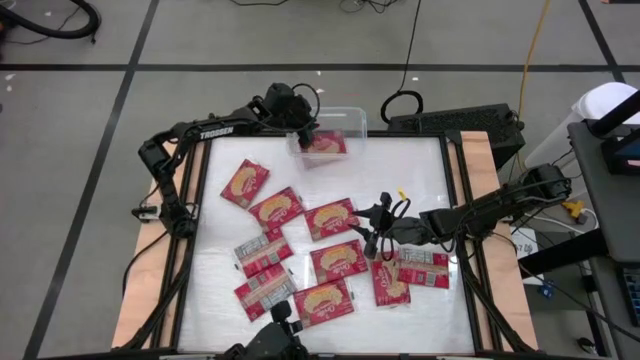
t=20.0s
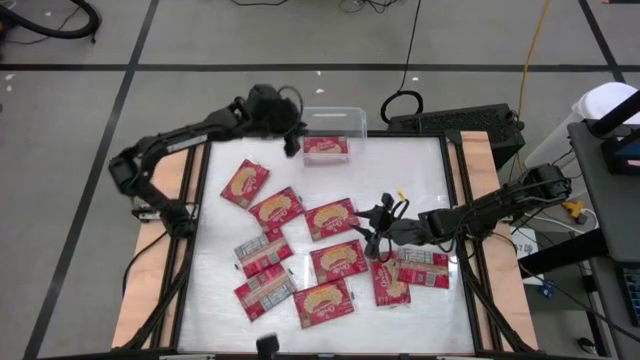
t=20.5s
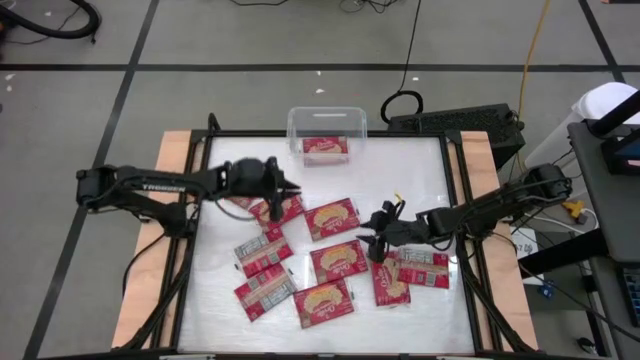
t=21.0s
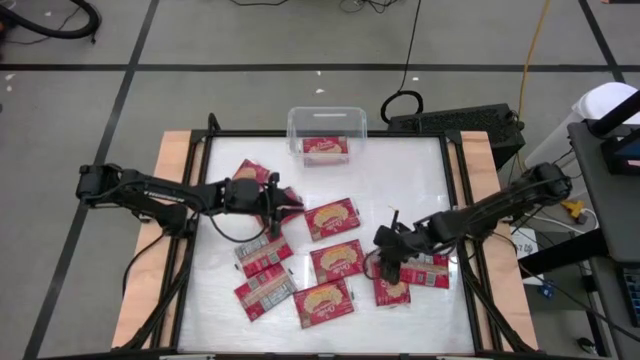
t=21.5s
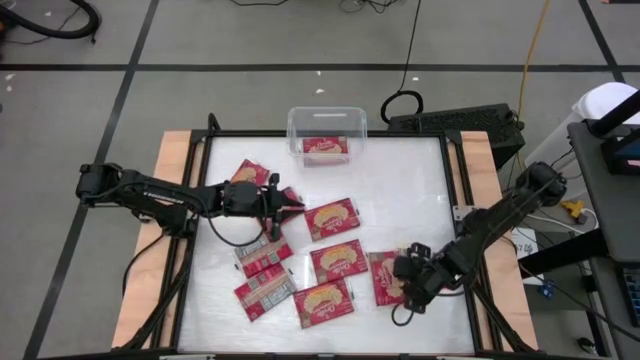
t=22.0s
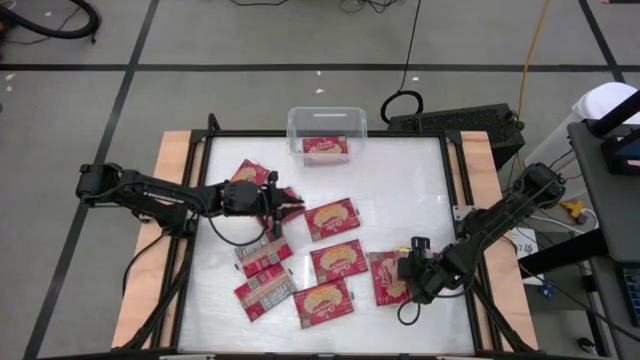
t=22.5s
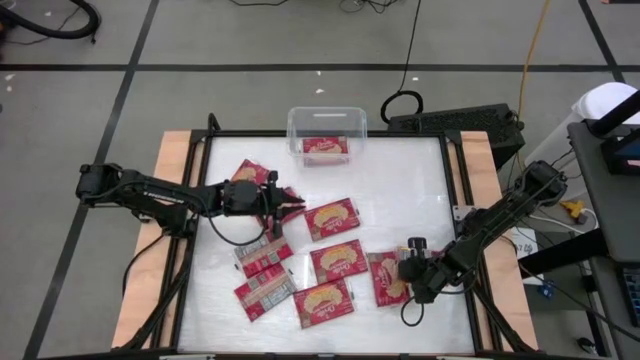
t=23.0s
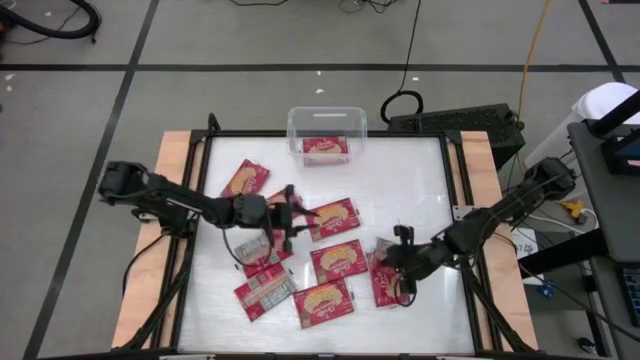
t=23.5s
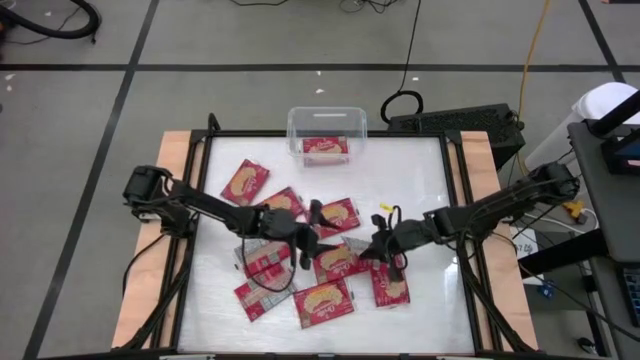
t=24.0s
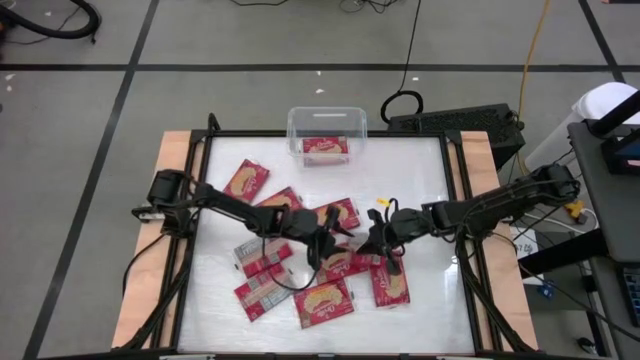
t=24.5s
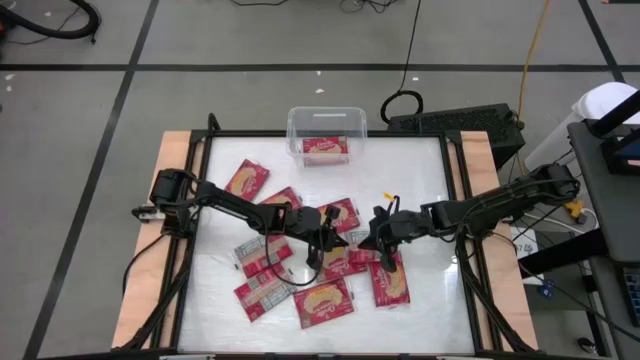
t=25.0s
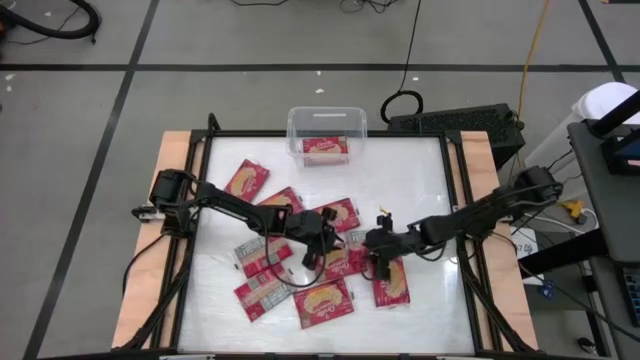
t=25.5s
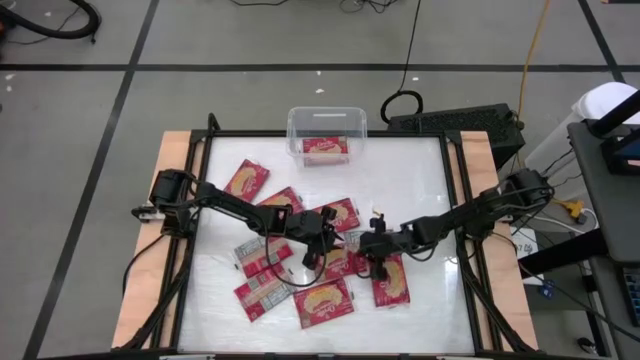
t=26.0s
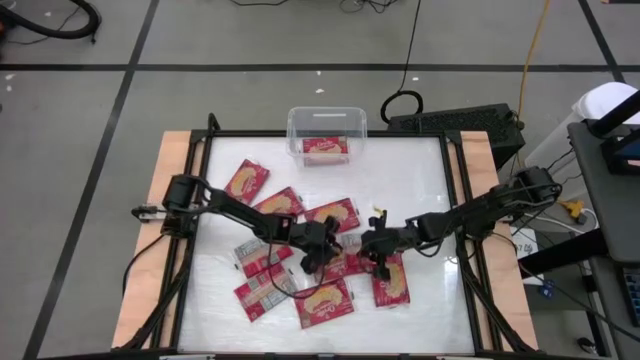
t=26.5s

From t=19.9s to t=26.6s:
Task: Sort popcorn bags into baskets
Put the popcorn bag into the transparent bin

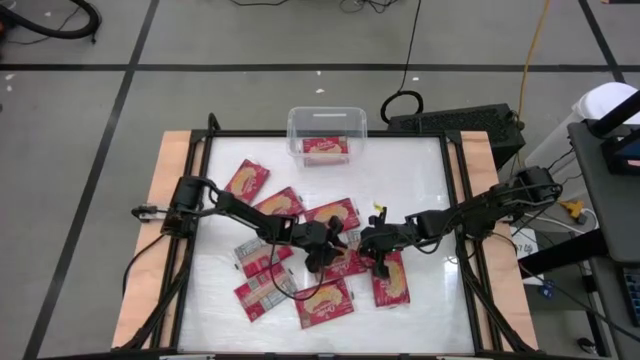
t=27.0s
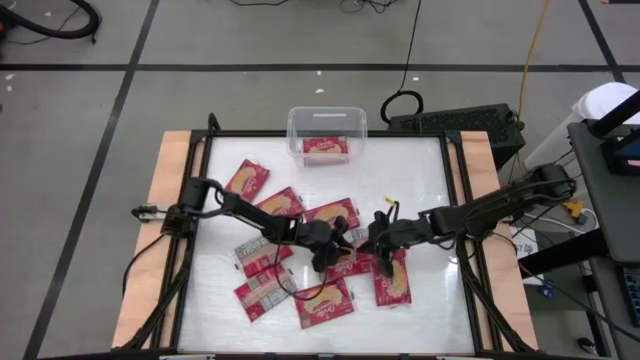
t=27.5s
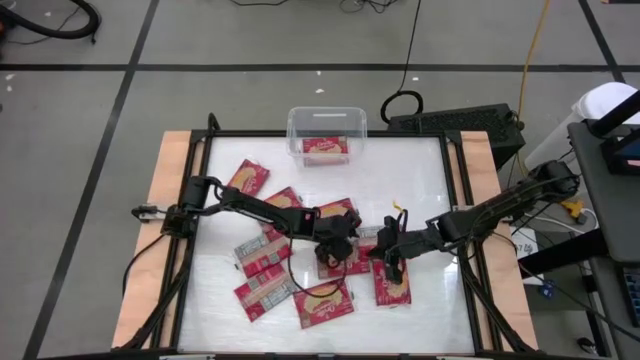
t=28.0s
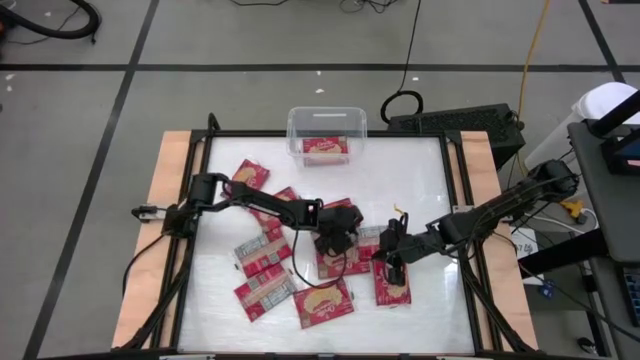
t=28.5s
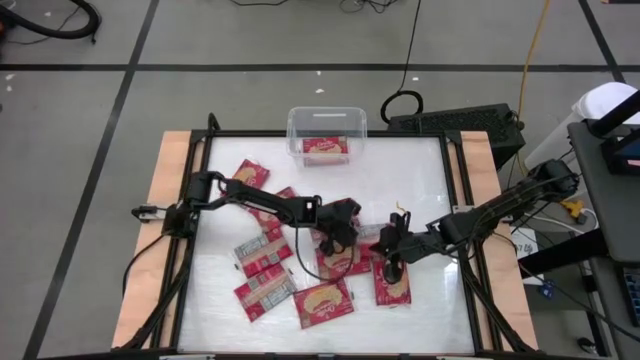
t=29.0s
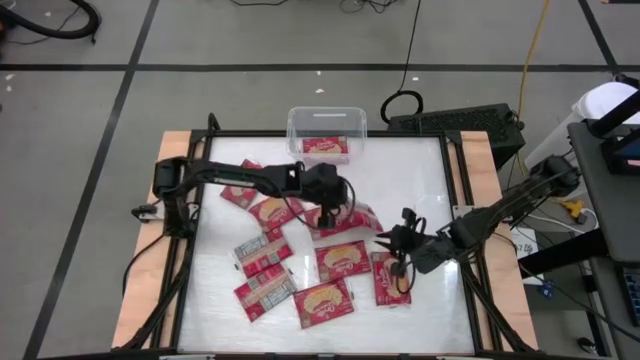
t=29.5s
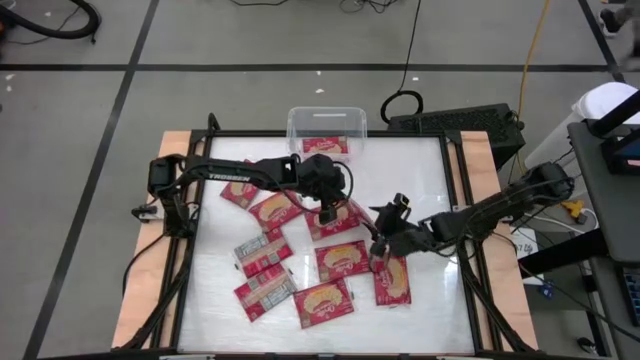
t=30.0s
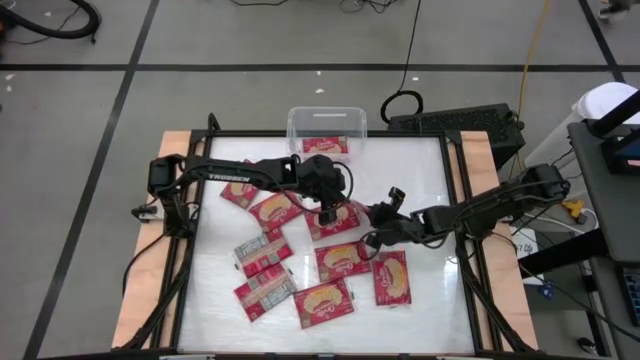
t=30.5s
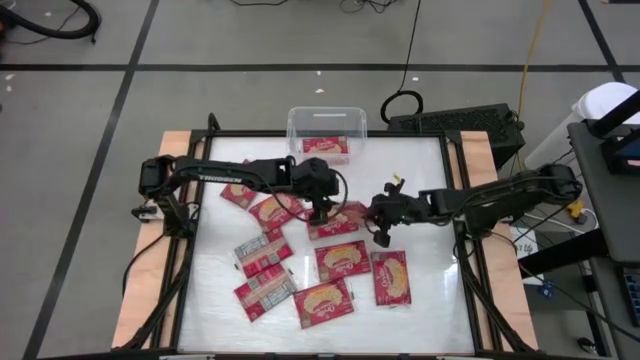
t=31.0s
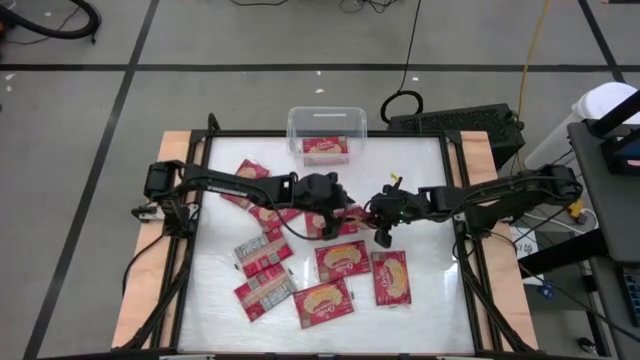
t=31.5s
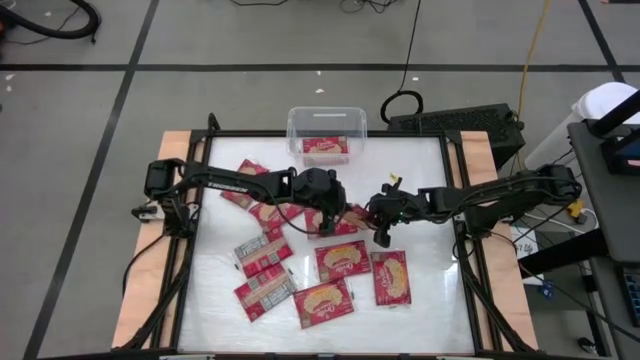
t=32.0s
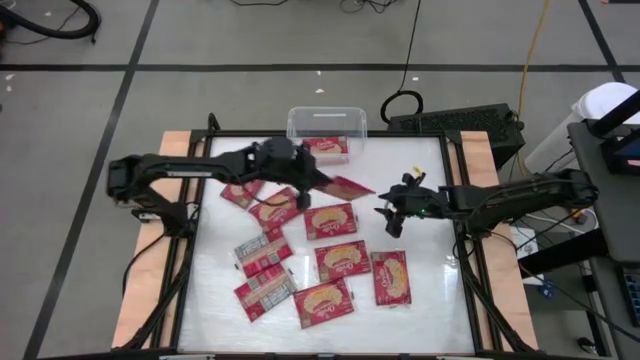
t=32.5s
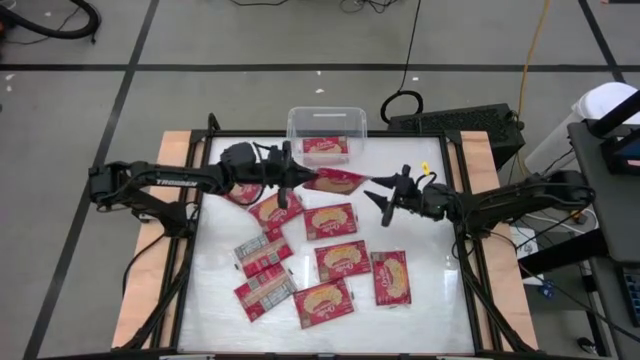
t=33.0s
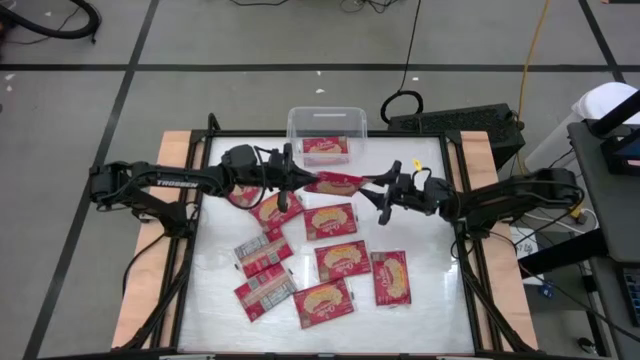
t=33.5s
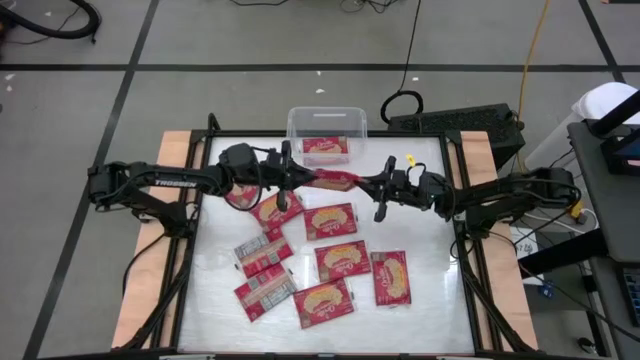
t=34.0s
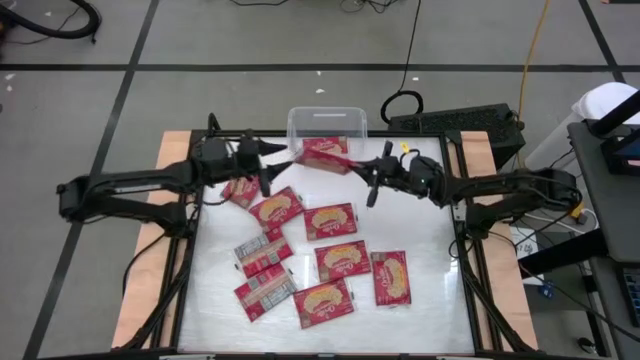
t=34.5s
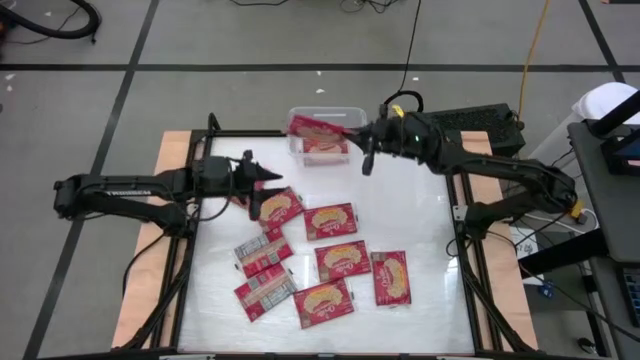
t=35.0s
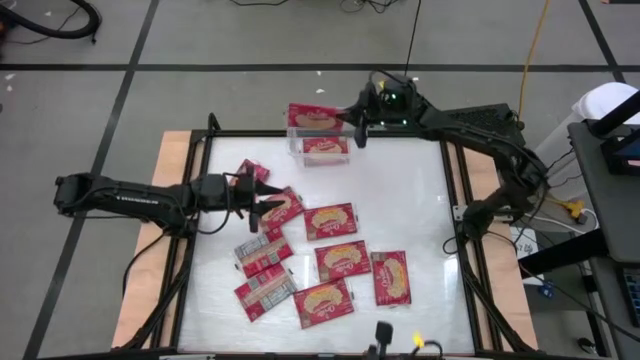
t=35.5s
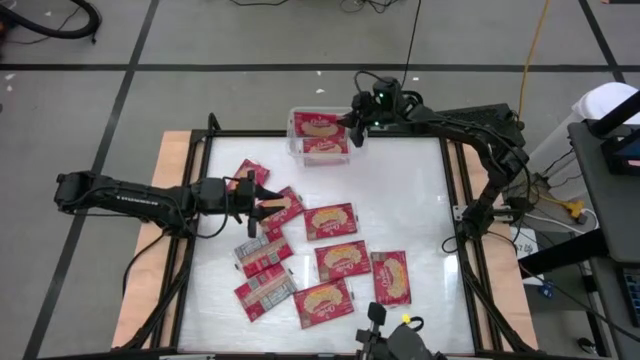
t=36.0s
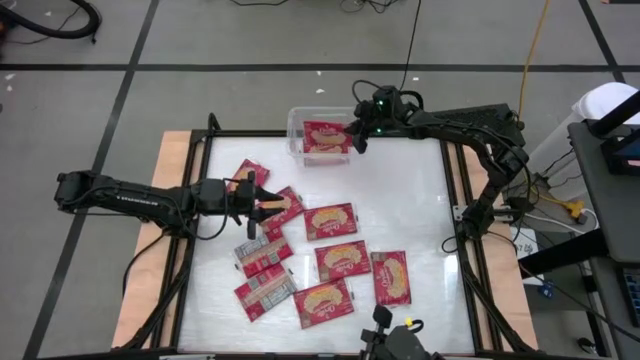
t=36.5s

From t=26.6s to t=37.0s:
Put the popcorn bag into the transparent bin

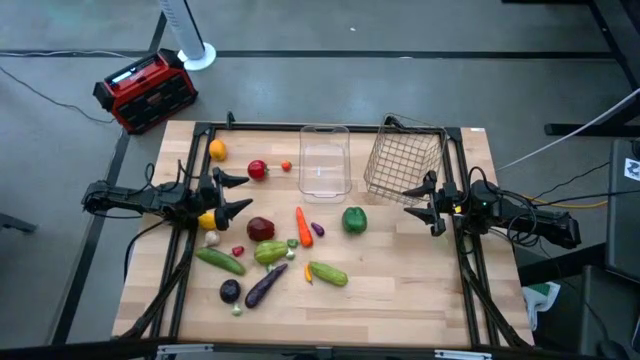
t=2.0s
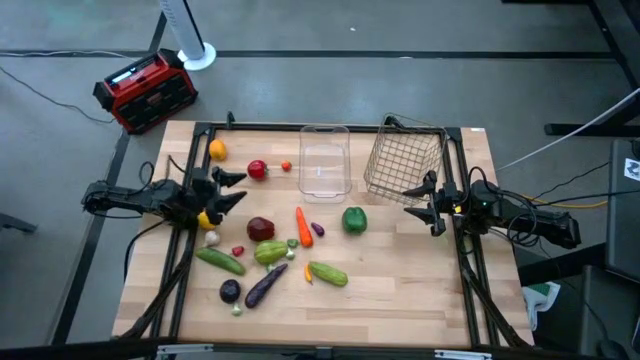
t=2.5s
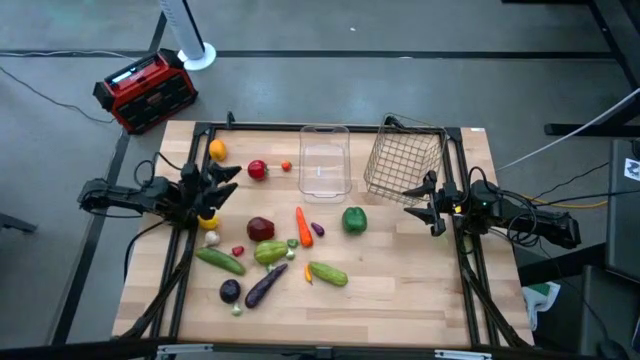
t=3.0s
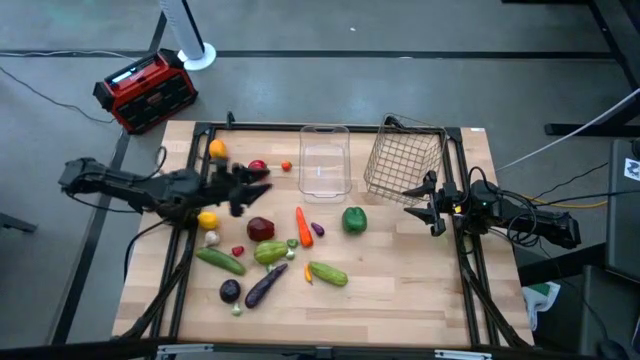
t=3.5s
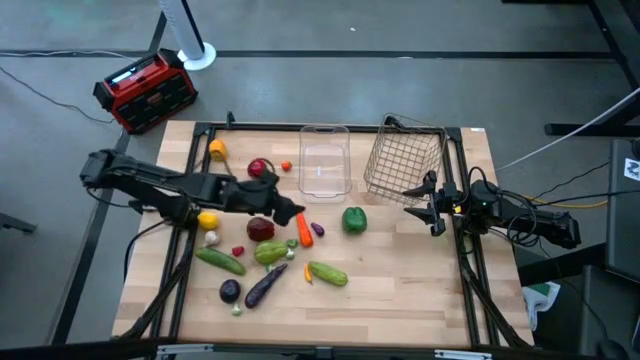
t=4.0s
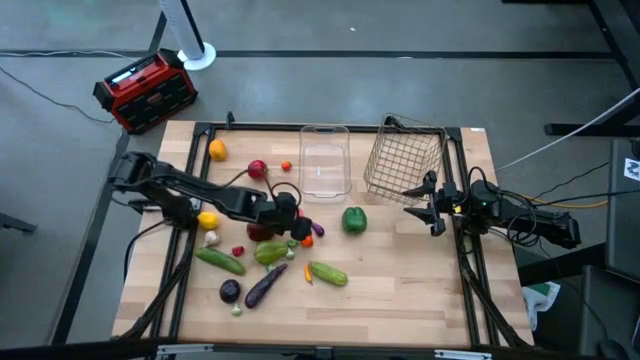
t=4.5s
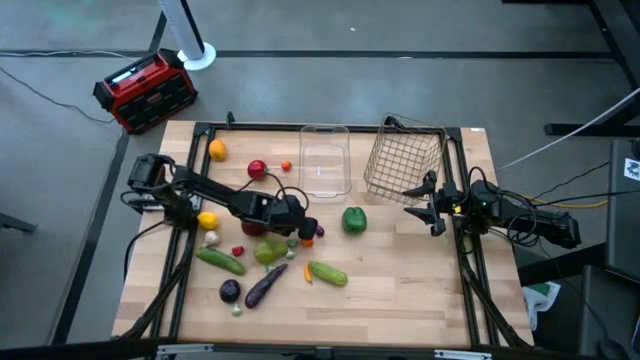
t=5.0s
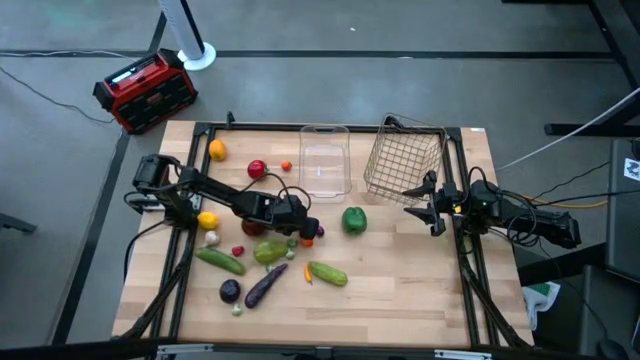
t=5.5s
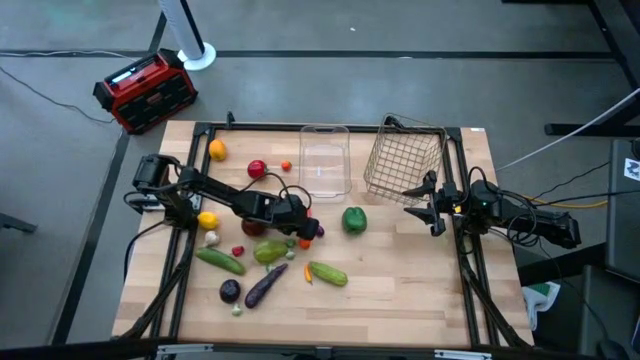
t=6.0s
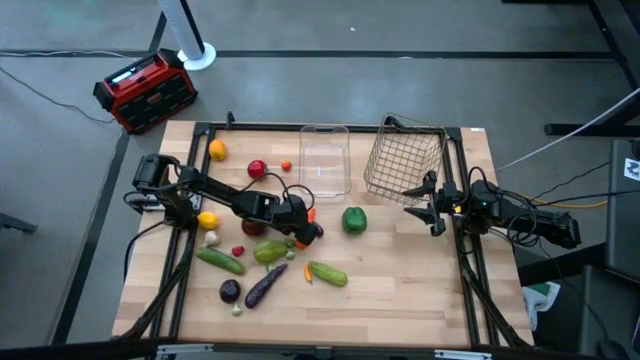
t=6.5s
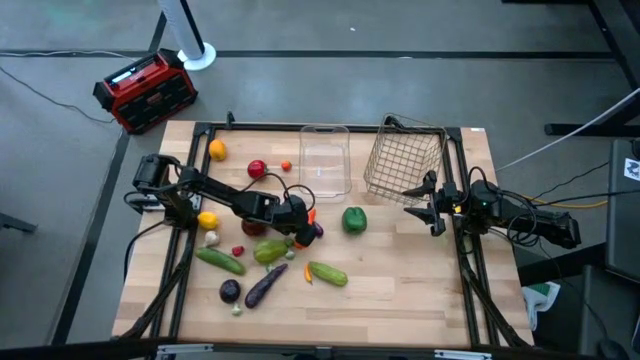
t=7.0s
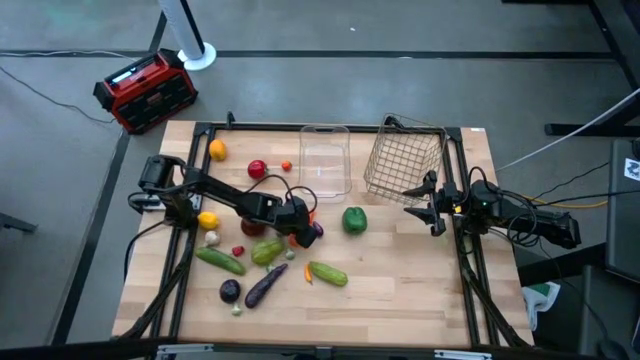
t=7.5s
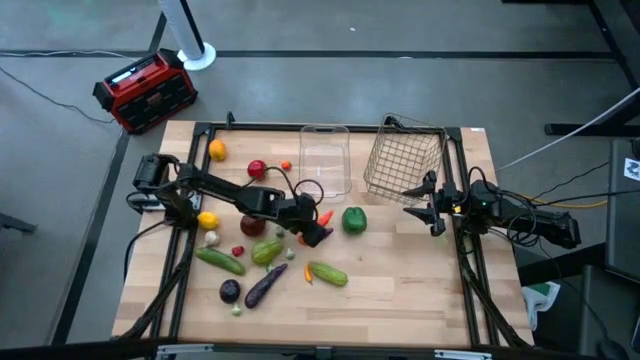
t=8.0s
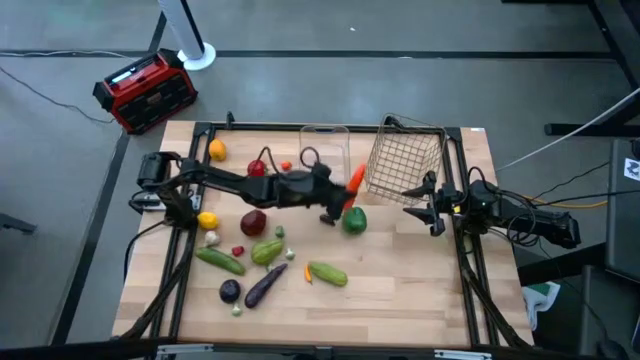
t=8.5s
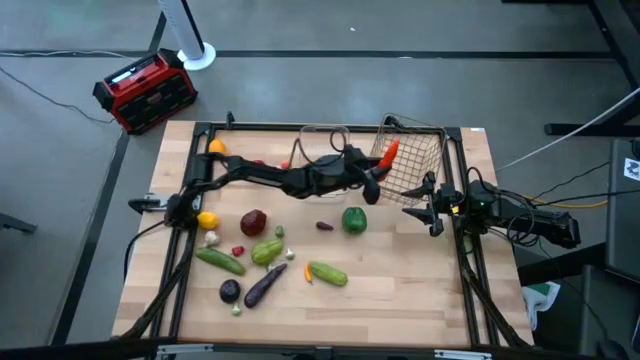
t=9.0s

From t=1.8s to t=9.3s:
Task: Sort produce into baskets
Put the orange carrot into the wire basket
